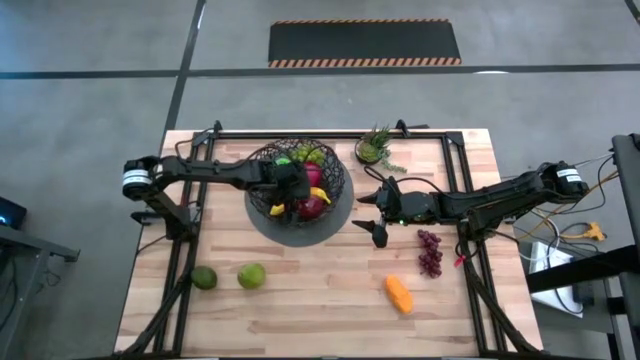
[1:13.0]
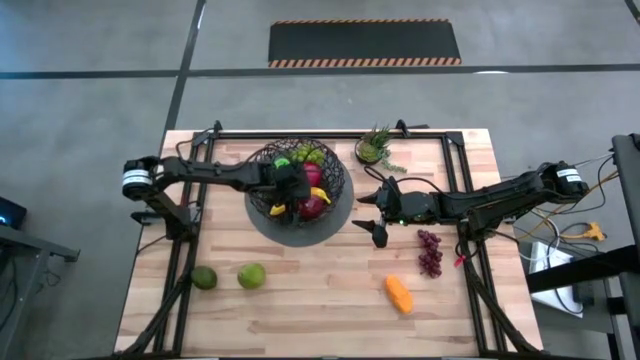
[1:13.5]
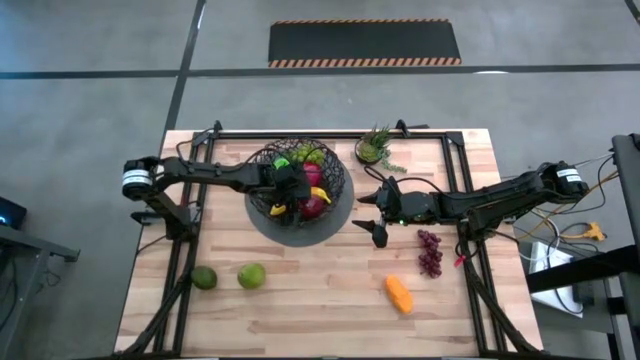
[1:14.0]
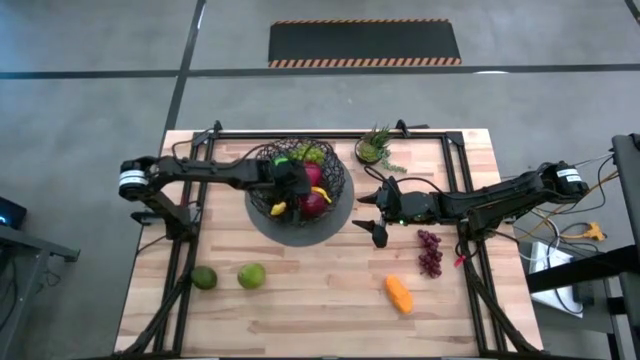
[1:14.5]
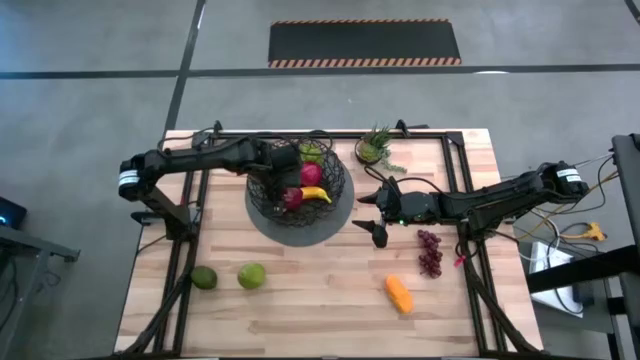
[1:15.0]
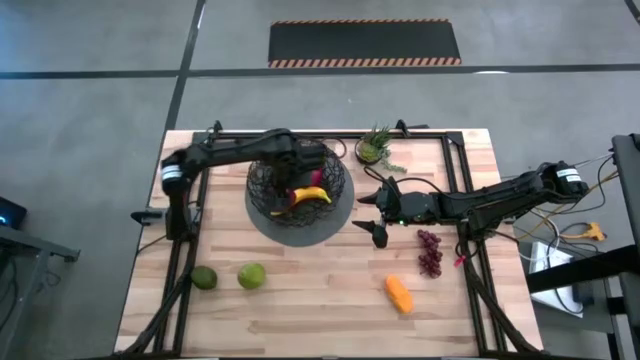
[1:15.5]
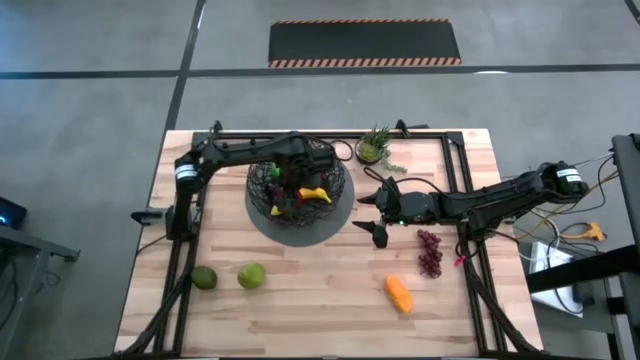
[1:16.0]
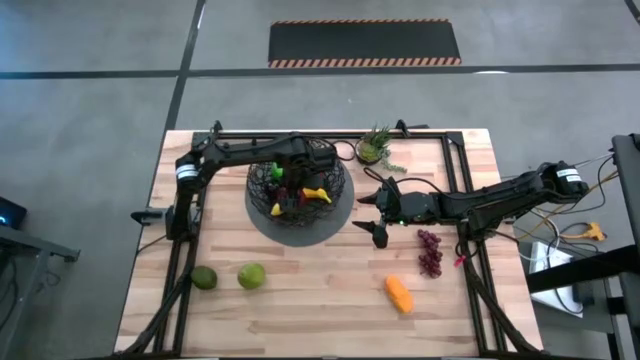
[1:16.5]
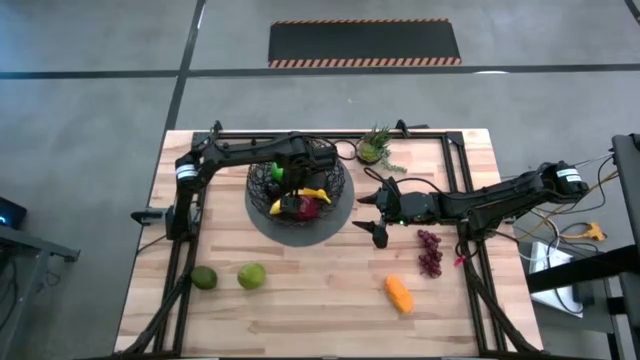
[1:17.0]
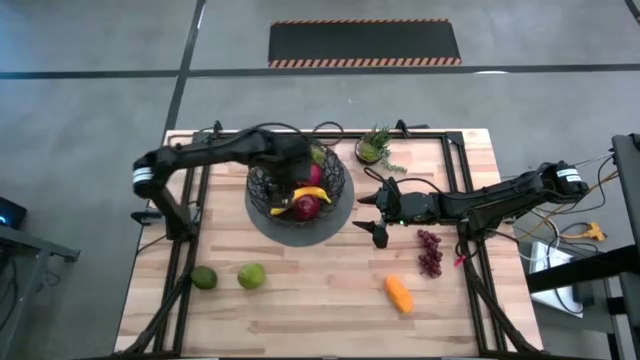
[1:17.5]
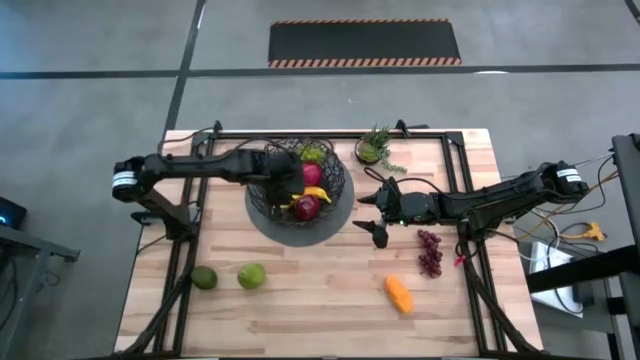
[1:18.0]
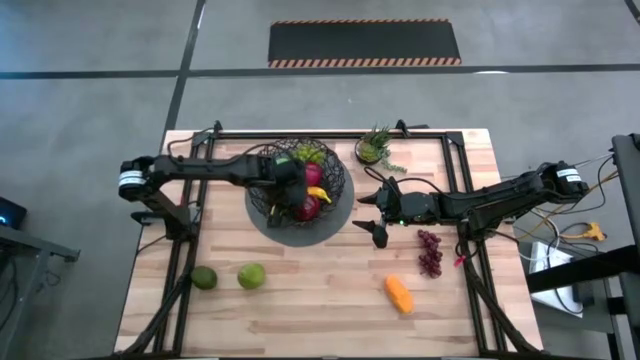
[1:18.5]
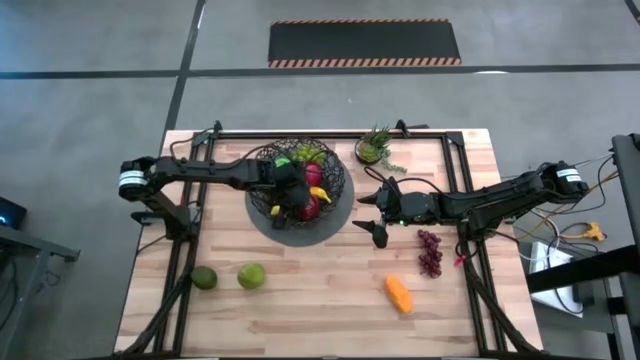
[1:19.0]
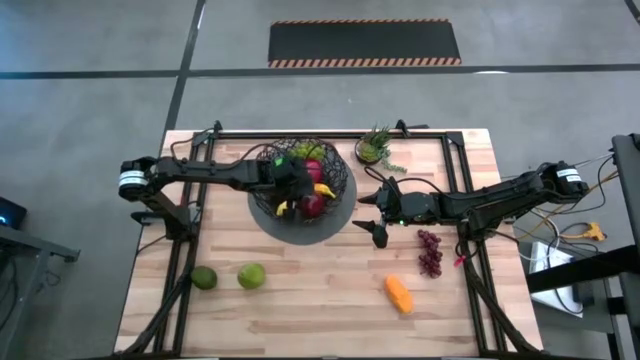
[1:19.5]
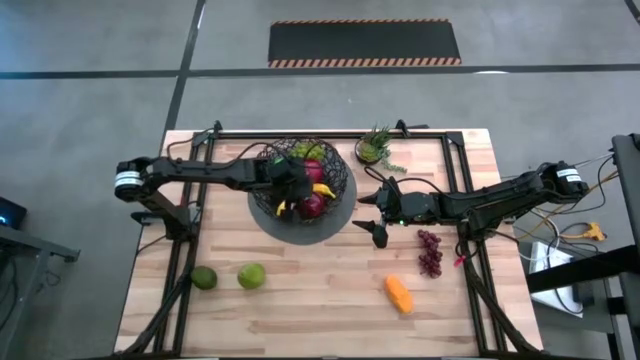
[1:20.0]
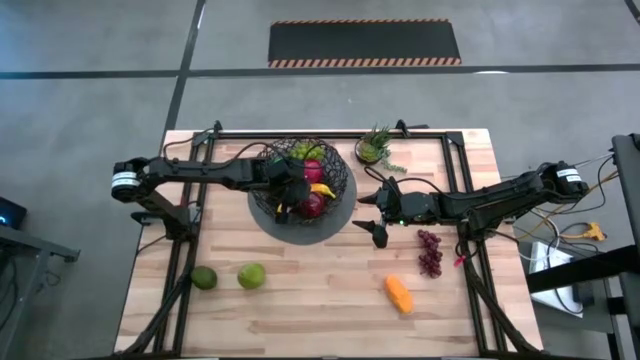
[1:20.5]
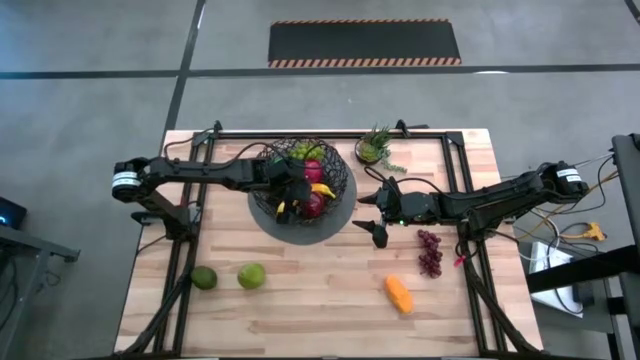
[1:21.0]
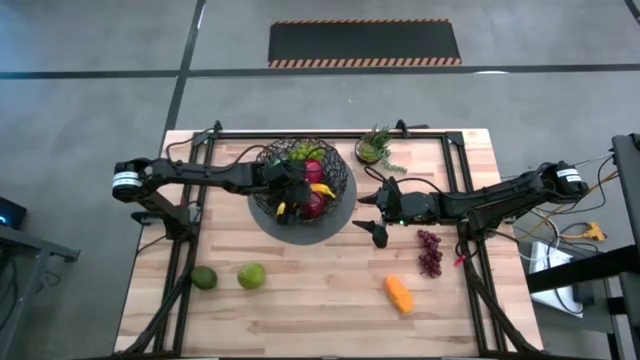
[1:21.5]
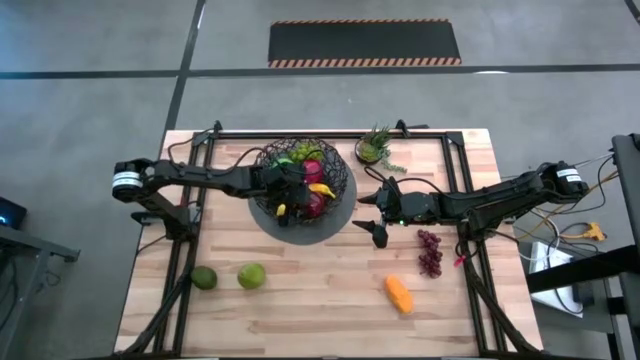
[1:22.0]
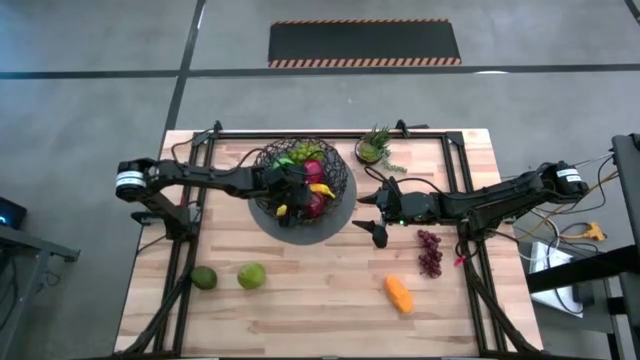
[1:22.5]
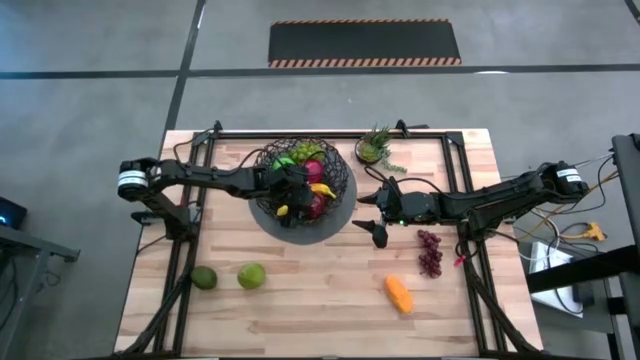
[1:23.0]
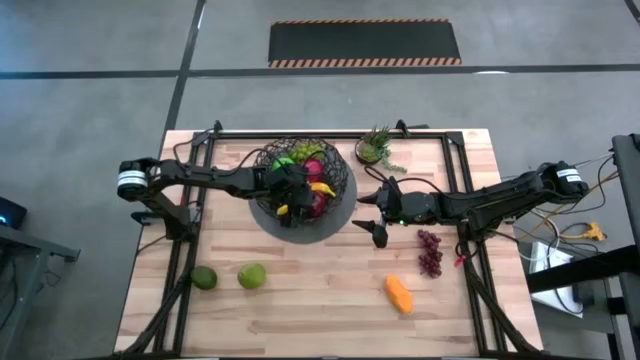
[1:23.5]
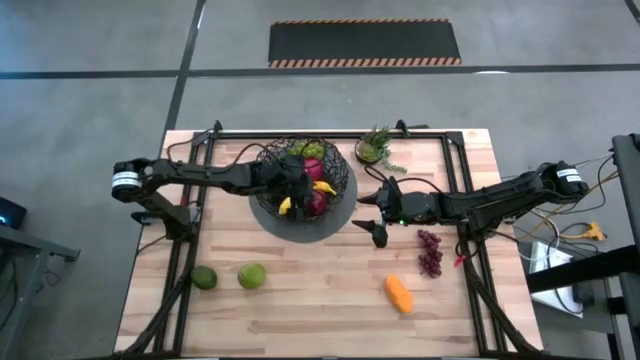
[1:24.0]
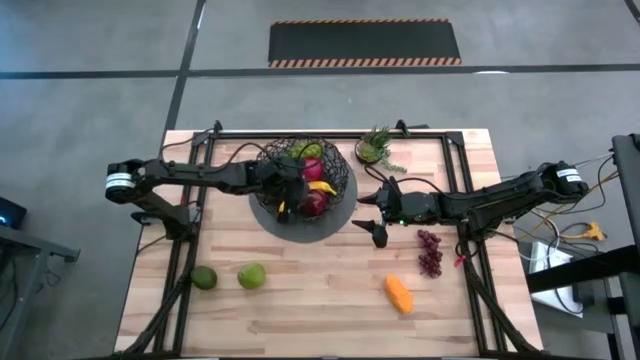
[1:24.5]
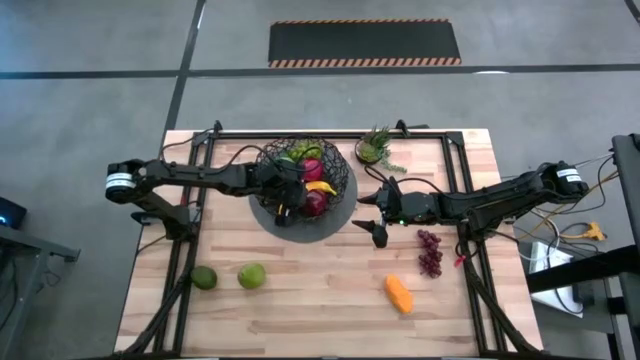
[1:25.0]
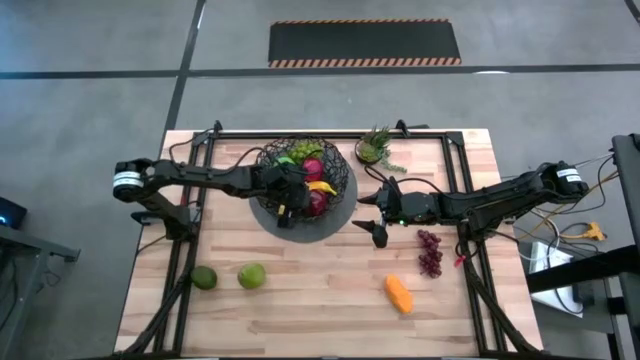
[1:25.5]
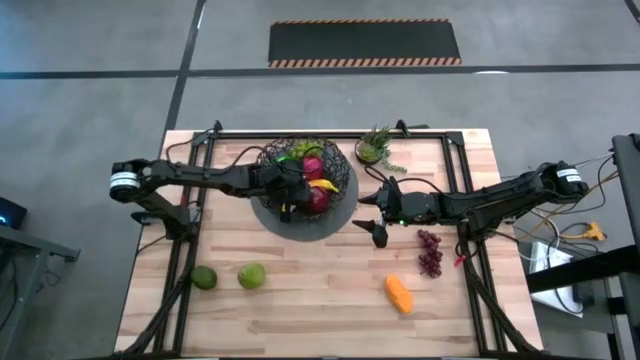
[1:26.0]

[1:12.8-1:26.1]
Task: Build produce basket
Put the red apple into the black wire basket

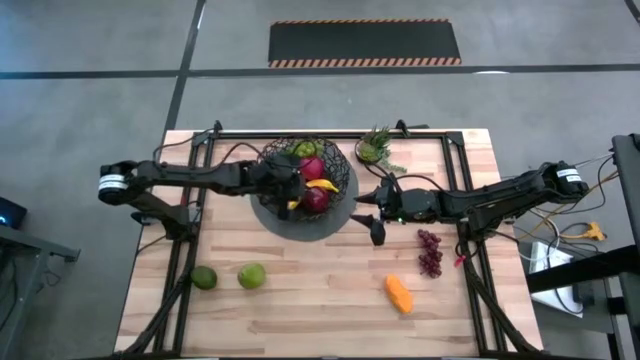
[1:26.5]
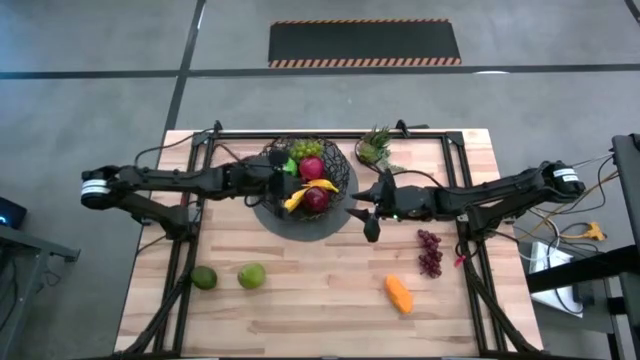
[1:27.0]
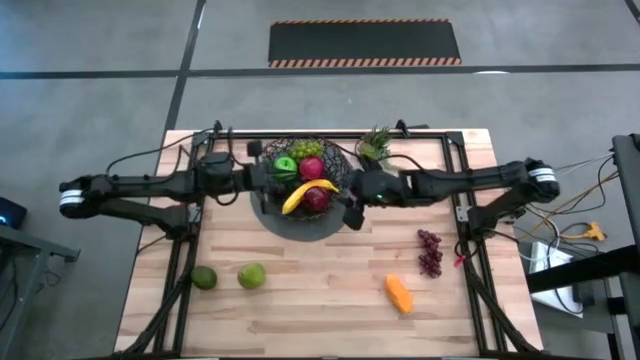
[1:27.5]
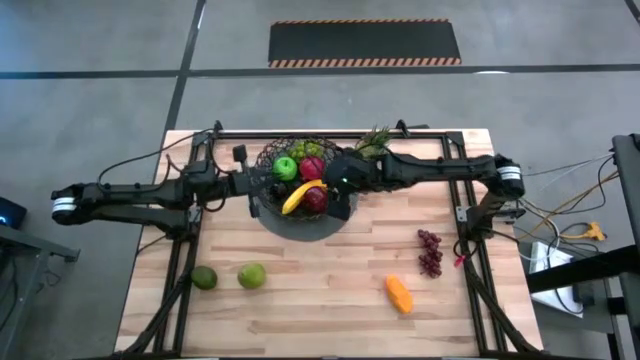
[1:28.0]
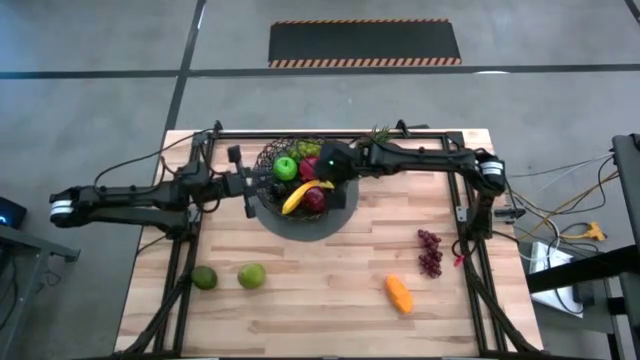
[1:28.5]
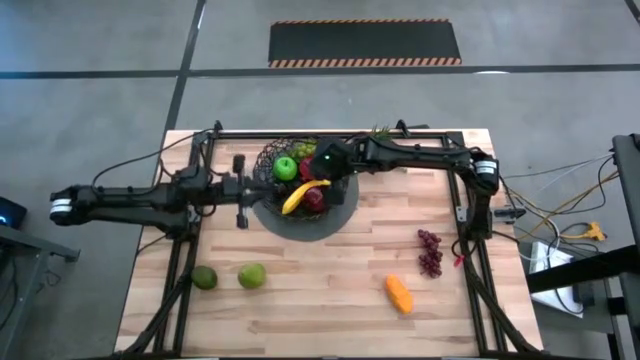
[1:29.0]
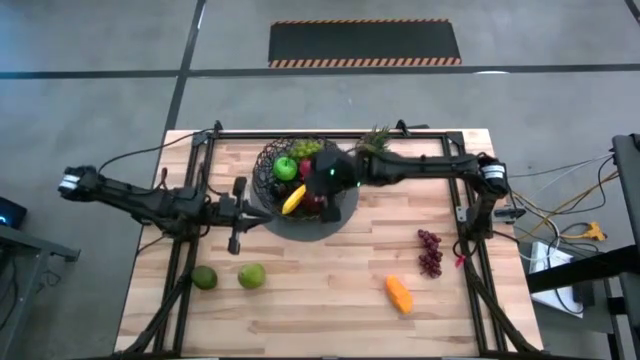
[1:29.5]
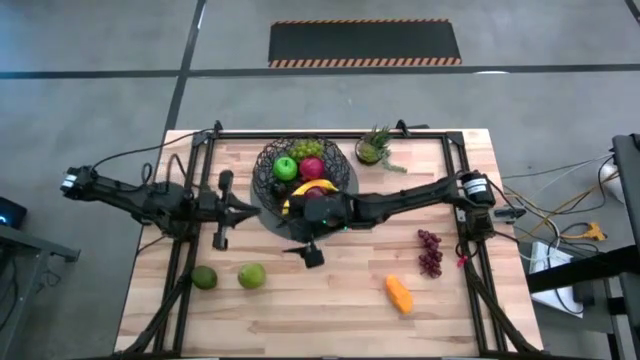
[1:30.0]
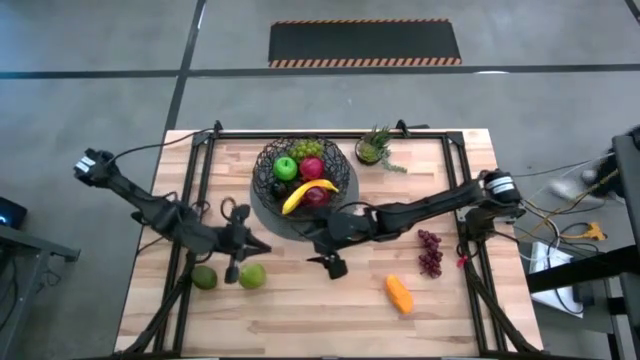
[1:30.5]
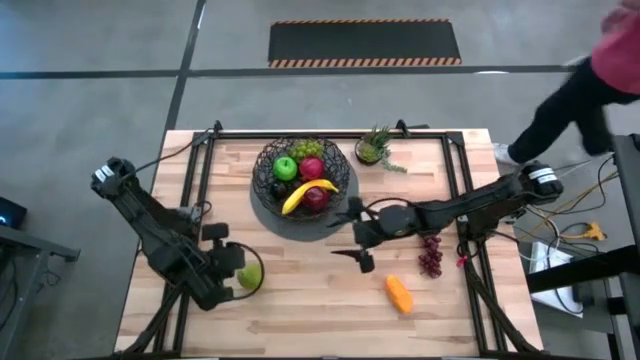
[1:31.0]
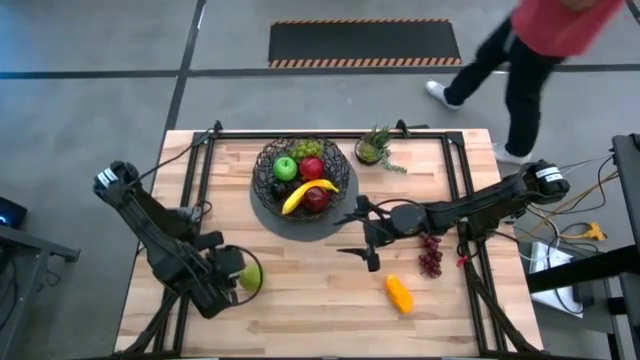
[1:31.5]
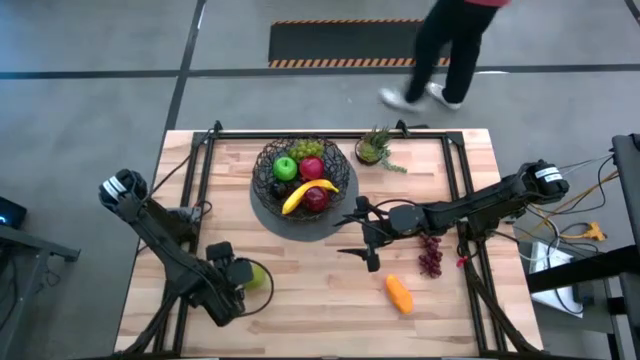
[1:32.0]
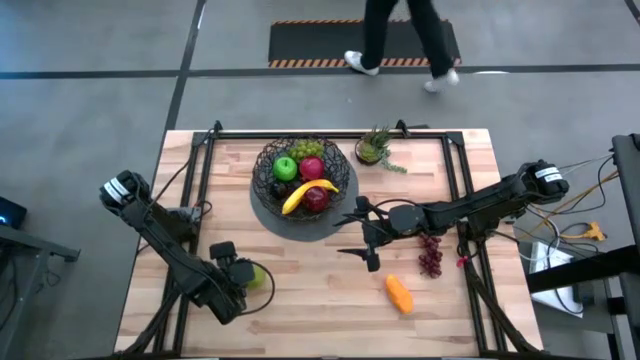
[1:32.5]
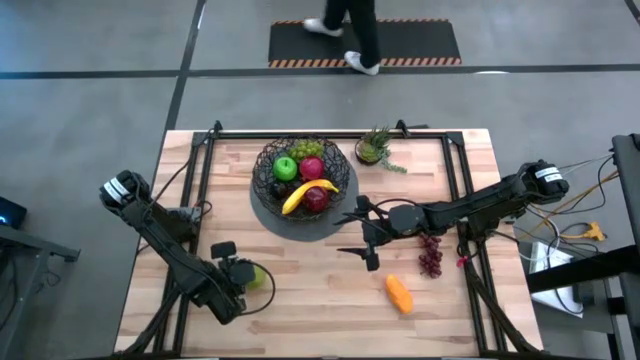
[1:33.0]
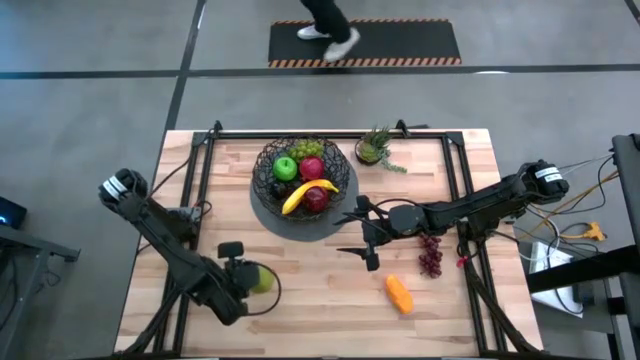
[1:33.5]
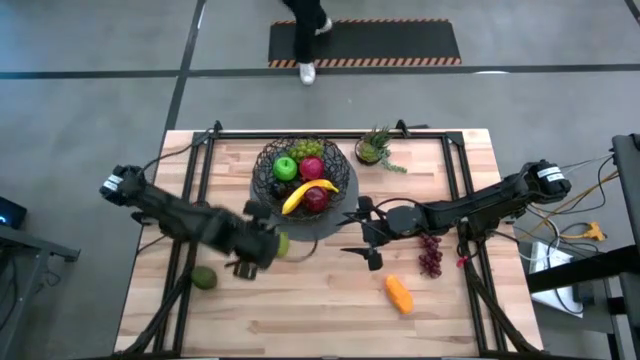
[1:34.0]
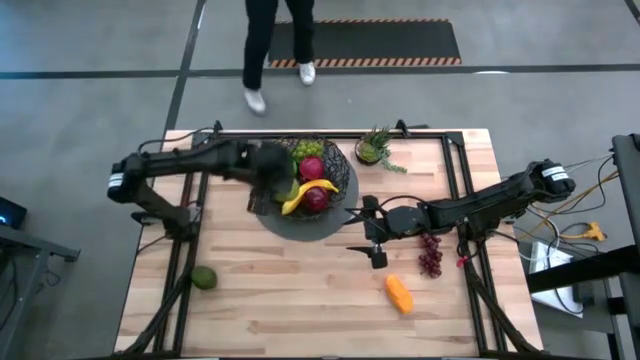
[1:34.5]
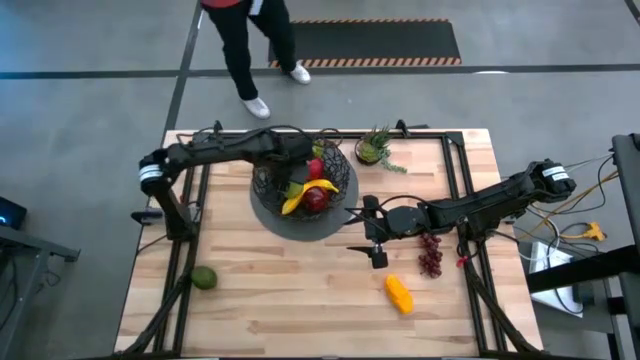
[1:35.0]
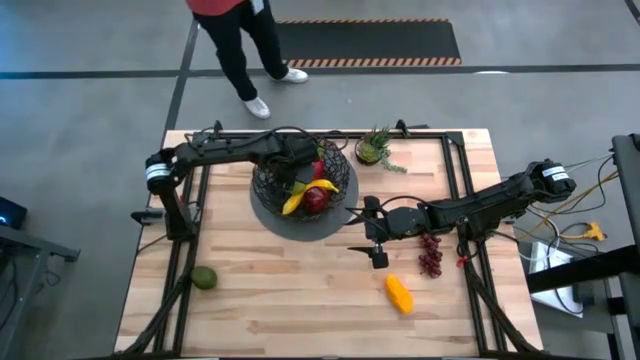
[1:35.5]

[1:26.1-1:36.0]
Put the pear into the black wire basket
